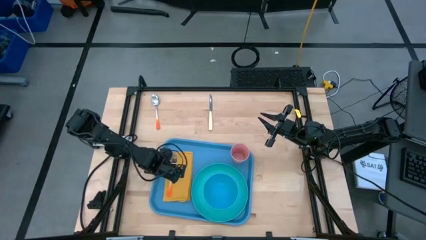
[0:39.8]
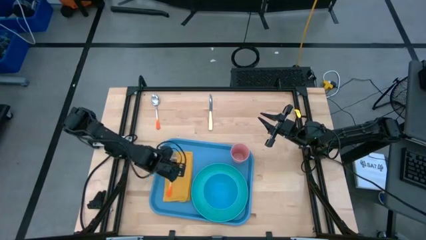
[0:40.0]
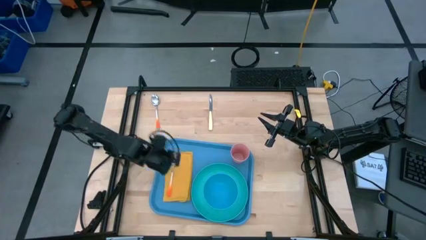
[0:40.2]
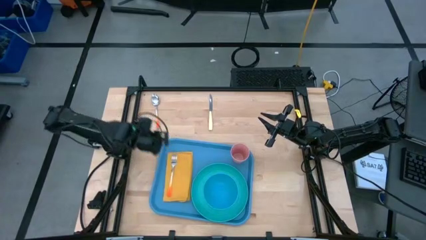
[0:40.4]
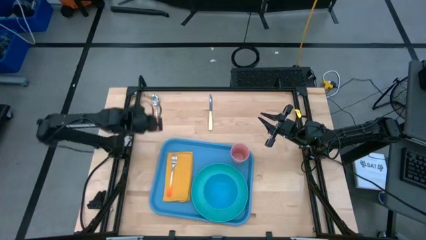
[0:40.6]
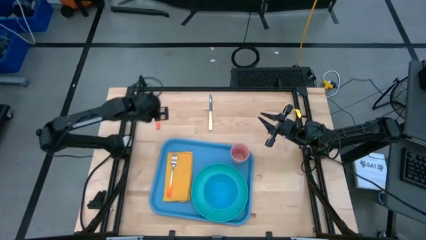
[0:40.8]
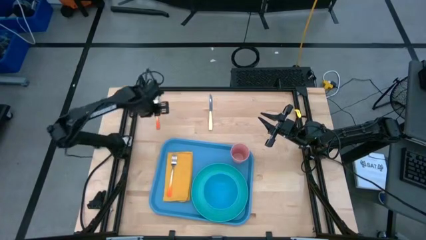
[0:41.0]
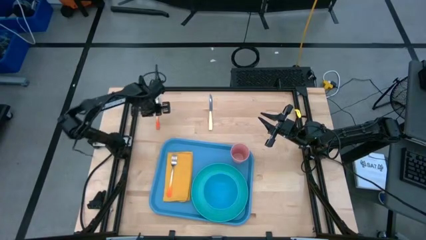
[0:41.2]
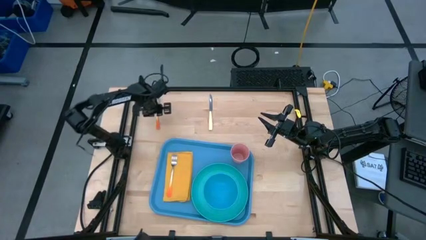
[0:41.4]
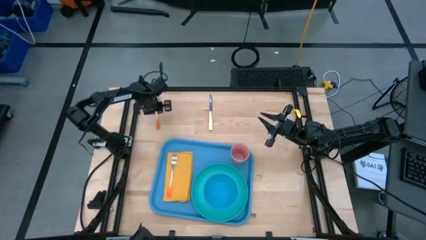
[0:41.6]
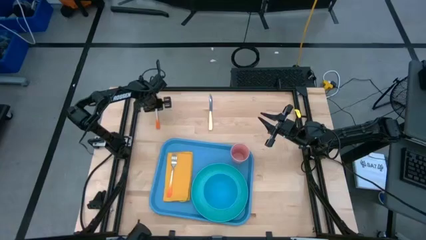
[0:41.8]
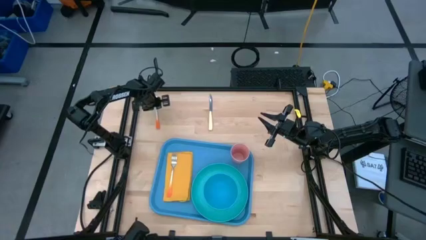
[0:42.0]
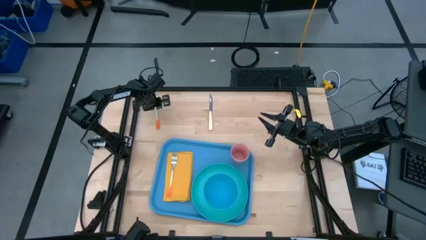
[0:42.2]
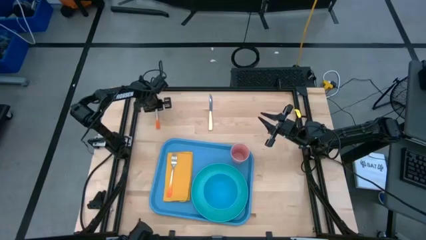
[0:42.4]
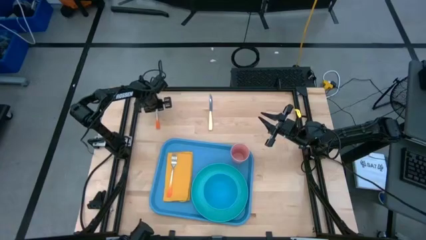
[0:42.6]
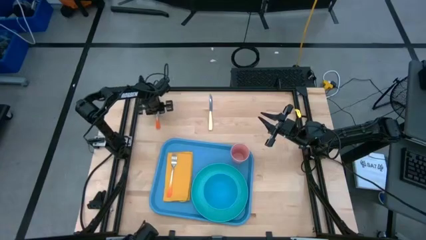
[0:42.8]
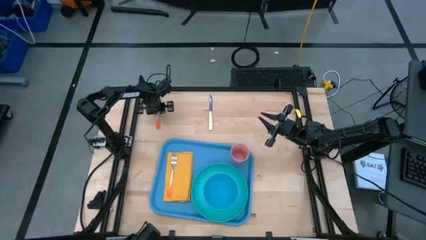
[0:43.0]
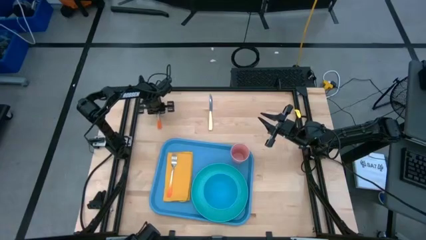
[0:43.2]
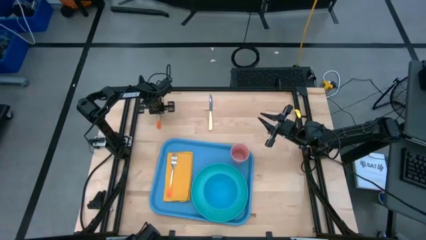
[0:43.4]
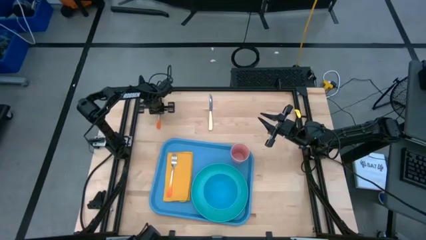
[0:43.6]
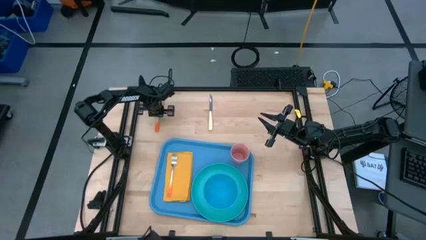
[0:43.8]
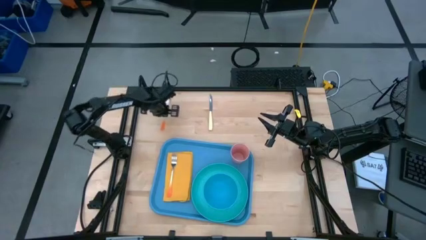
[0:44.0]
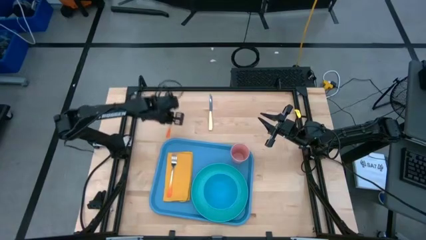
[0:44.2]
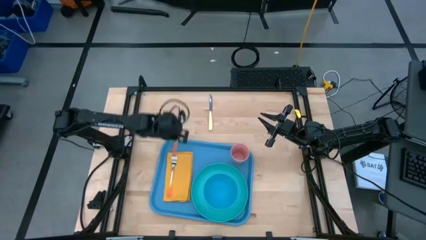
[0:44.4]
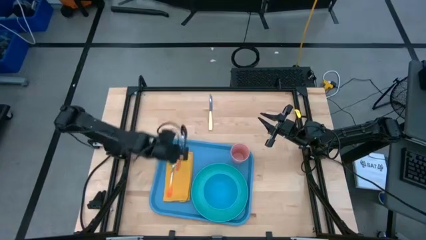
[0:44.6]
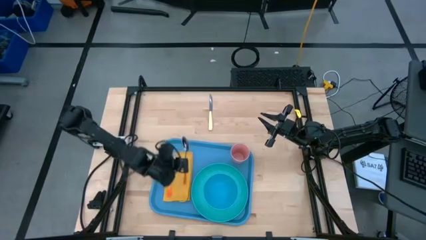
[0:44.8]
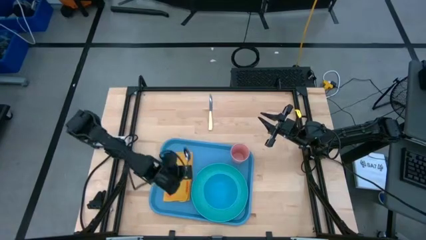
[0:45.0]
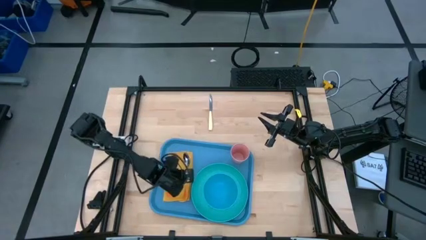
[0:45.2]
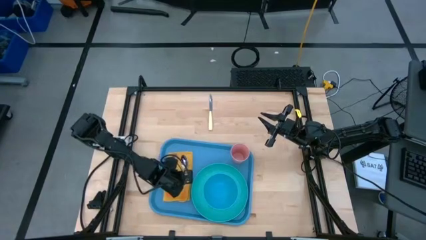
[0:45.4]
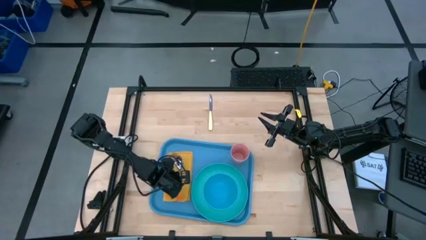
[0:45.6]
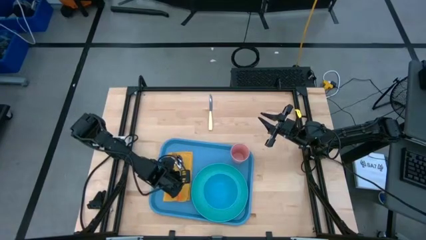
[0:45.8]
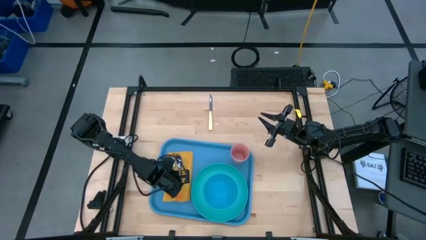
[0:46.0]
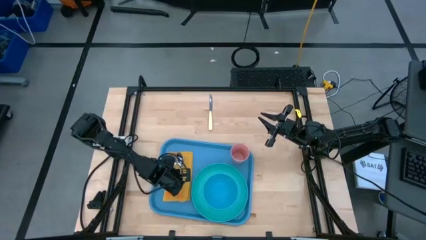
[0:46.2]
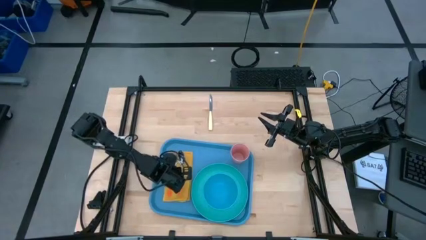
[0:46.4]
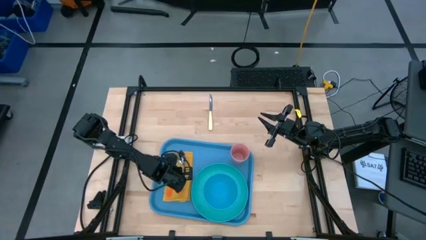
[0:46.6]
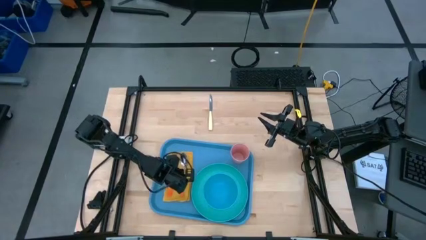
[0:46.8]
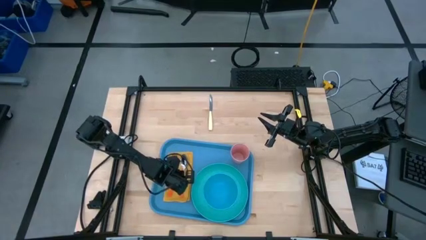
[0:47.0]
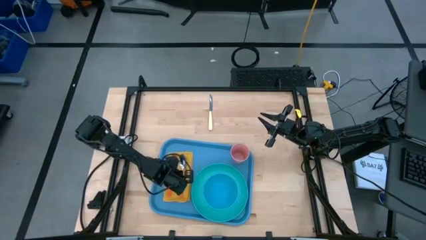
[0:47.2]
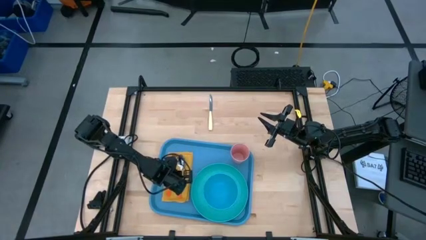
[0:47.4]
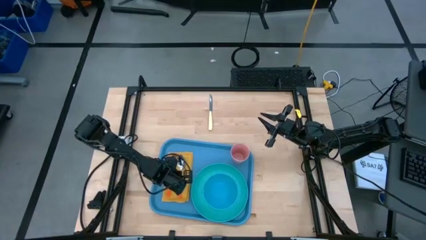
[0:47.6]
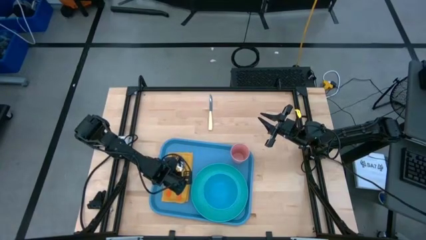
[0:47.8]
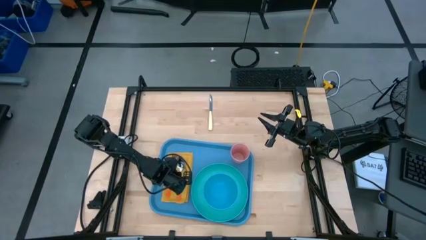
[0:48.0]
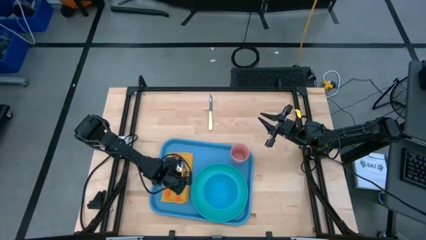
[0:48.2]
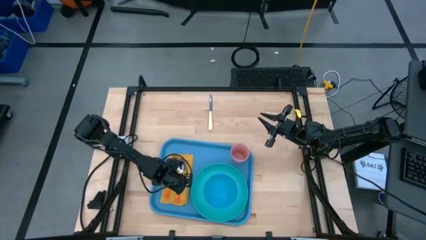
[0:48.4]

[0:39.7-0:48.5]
Task: Set up tray
Put the orange spoon on the orange napkin to the right of the orange fork

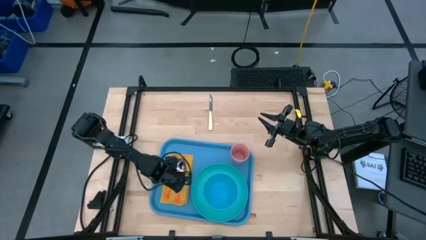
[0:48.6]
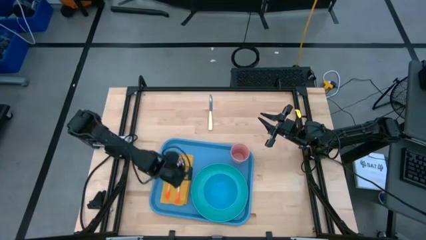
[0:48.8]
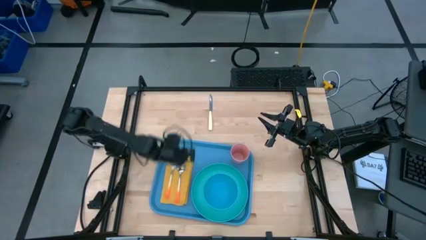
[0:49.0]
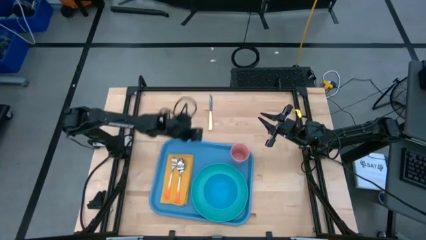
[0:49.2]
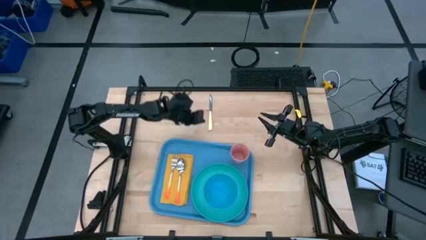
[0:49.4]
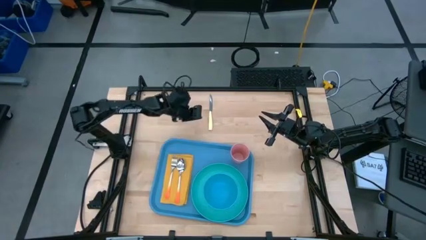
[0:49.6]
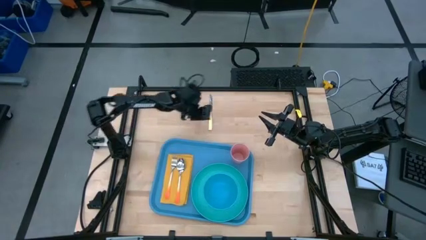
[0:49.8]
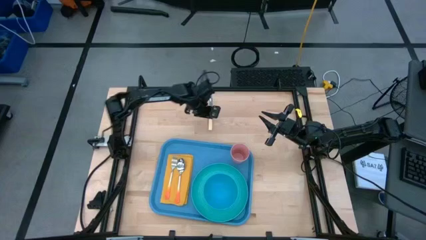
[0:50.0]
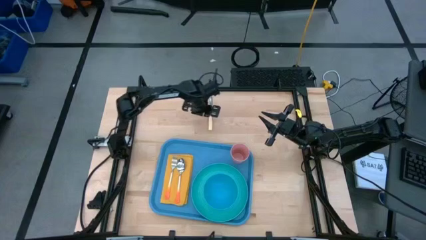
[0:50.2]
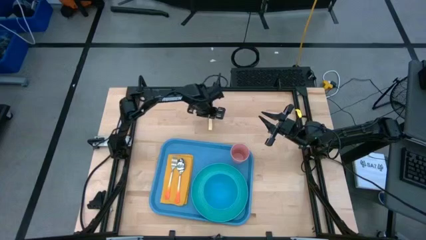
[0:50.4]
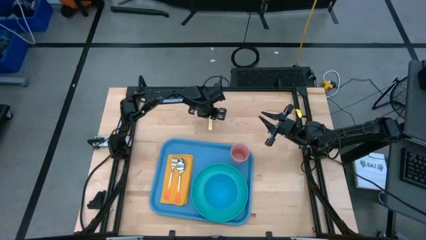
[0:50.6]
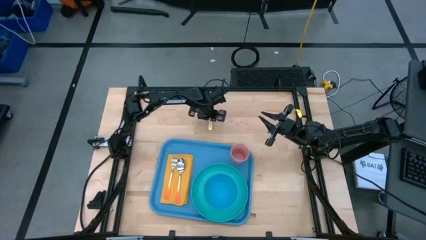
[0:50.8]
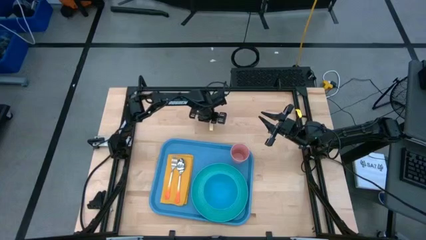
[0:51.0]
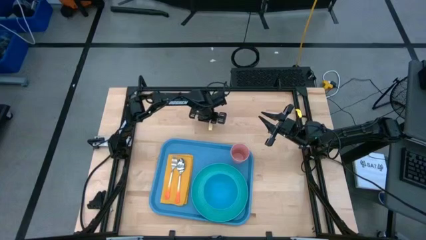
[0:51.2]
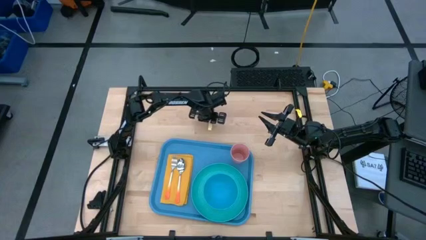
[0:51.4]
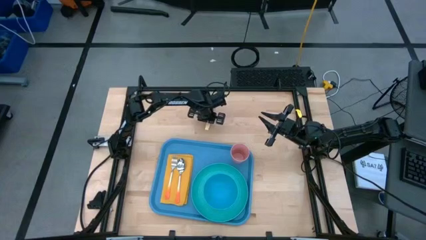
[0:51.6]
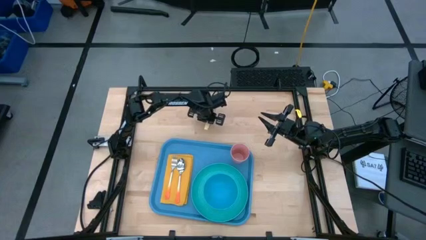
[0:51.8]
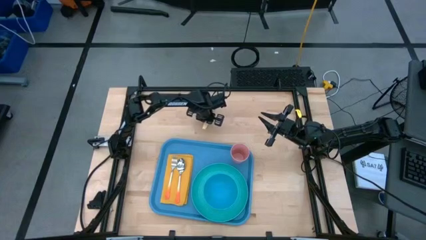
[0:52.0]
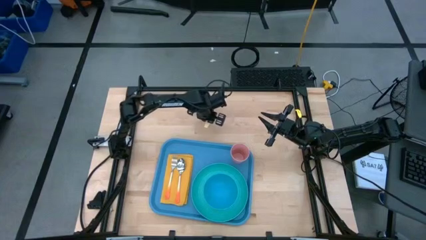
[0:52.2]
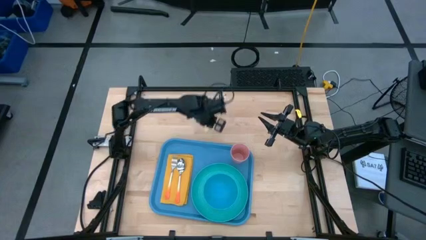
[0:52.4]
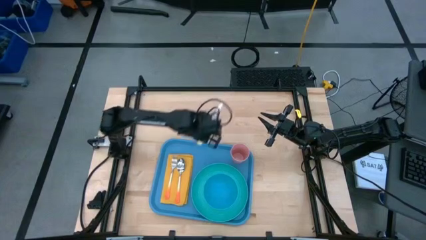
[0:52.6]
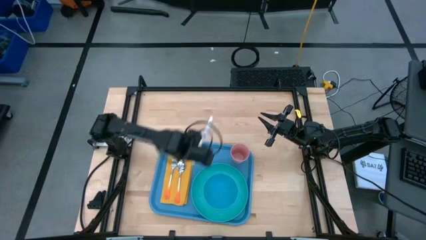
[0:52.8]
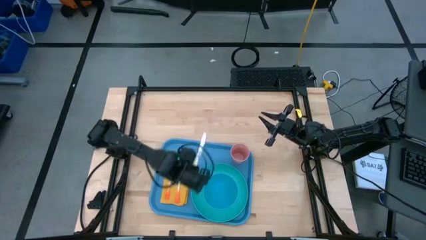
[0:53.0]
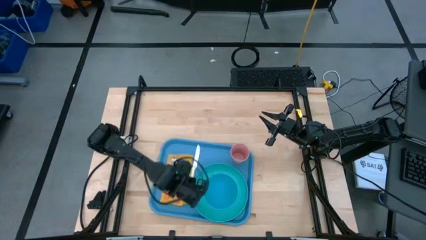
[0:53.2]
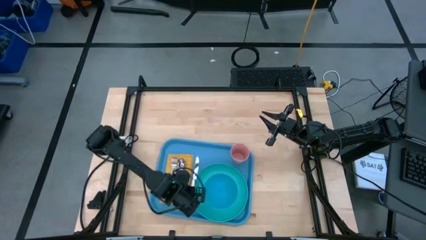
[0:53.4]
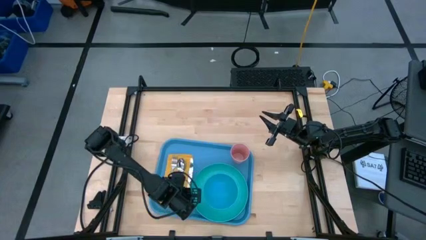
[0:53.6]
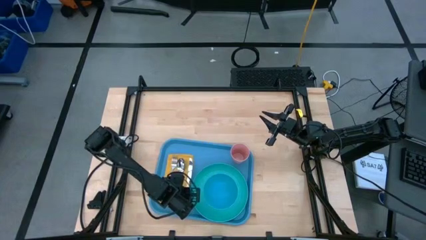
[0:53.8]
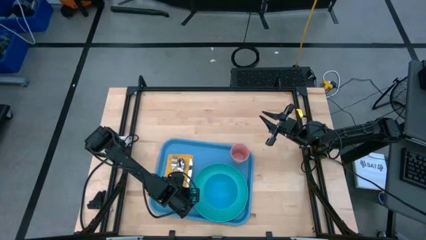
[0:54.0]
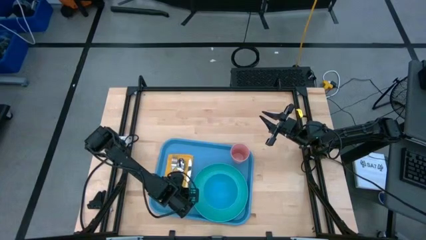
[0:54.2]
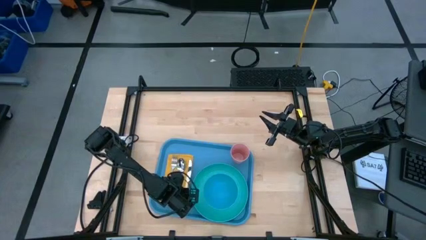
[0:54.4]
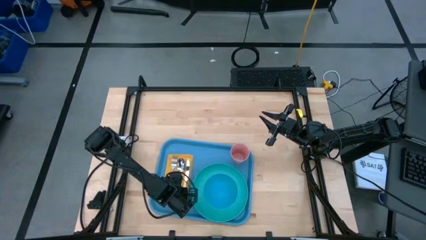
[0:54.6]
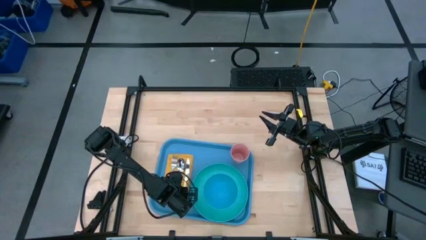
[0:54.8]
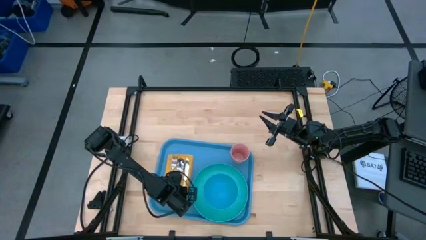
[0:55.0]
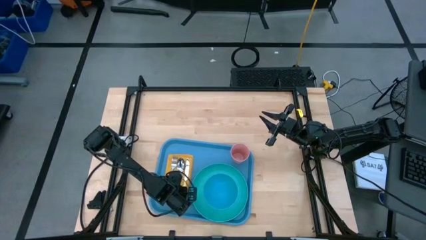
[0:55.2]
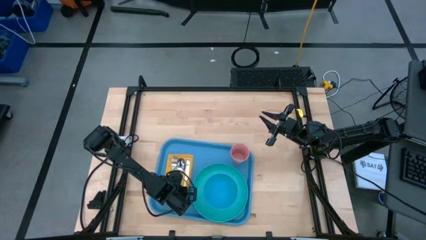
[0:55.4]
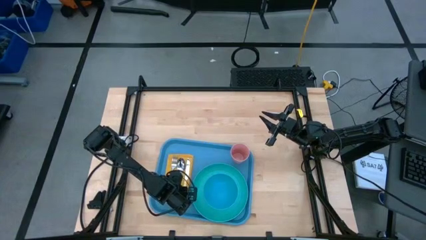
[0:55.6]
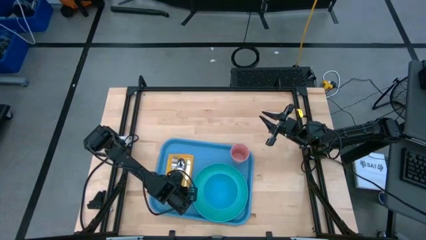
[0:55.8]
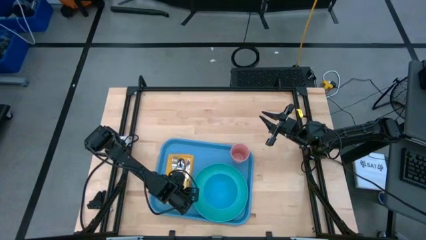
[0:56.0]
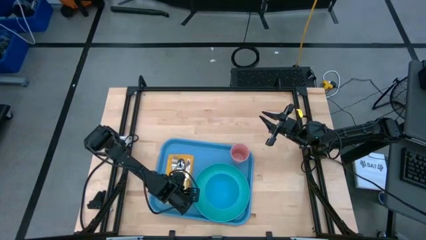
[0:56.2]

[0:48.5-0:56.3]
Put the yellow knife on the orange napkin to the right of the orange spoon

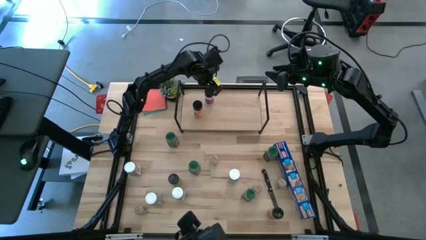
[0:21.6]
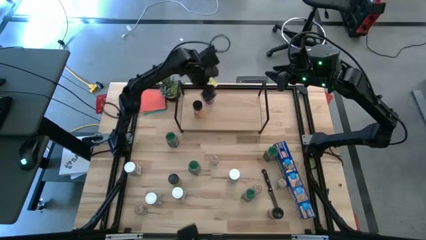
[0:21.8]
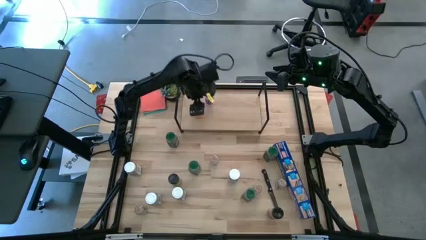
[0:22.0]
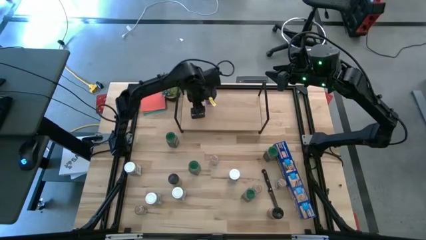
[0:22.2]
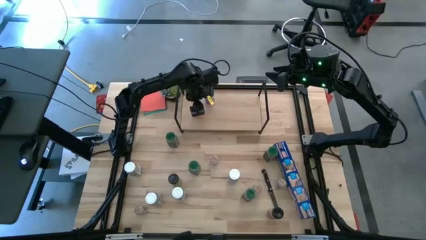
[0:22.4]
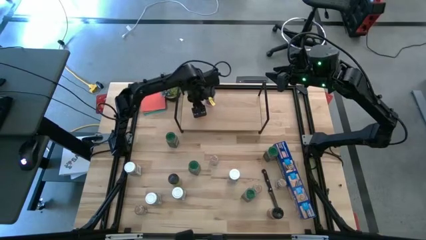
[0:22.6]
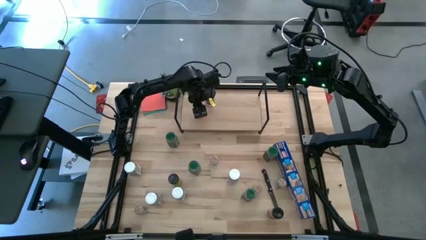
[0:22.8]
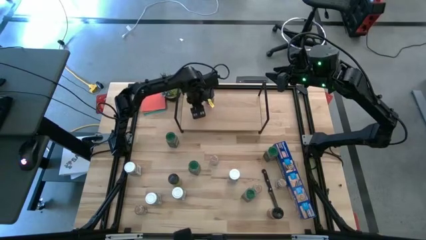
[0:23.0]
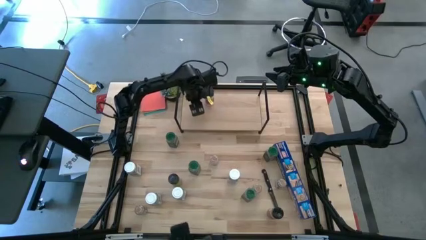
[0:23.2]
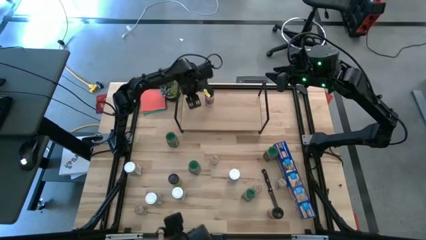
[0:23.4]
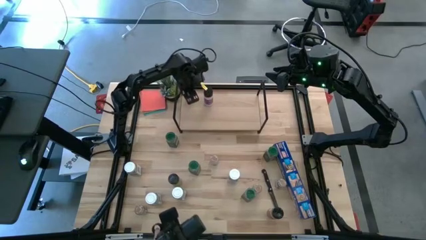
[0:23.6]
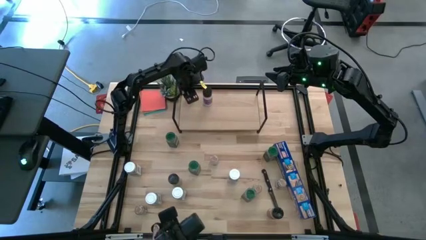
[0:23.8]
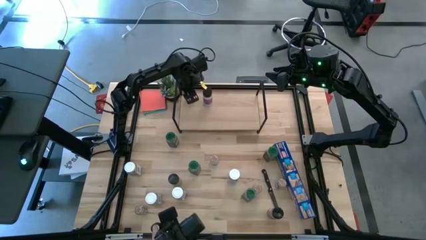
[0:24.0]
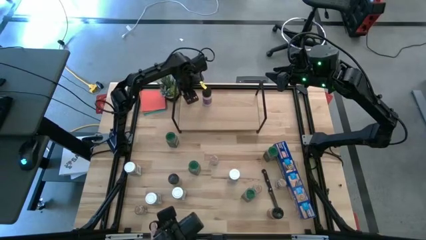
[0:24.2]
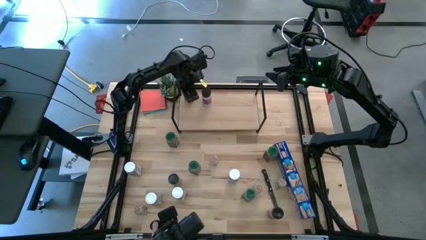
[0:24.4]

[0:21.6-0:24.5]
Task: Shelf spices
Move the bottom black seasoning bottle to the top left on the shelf
